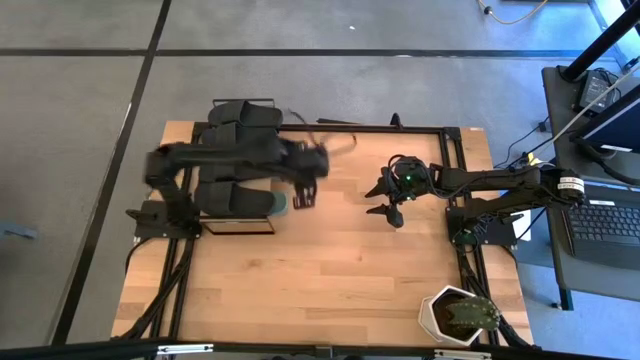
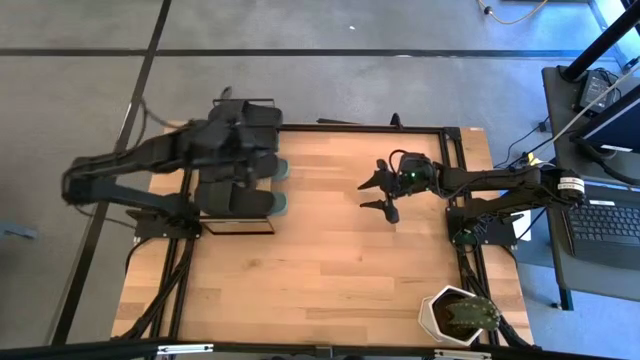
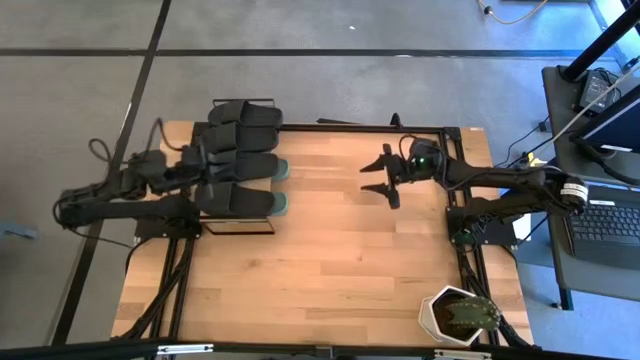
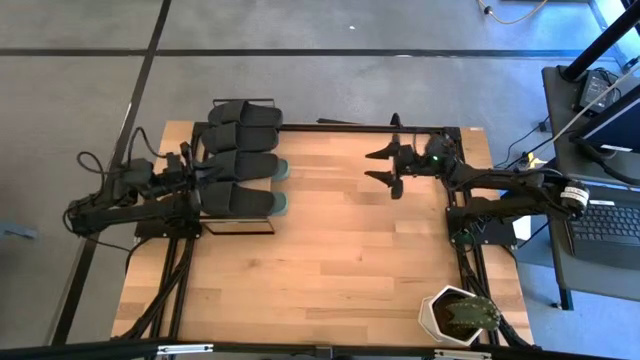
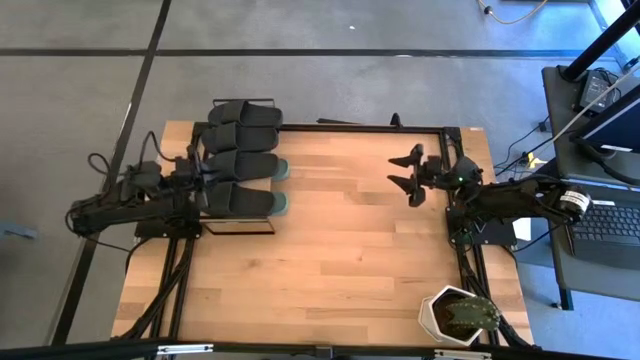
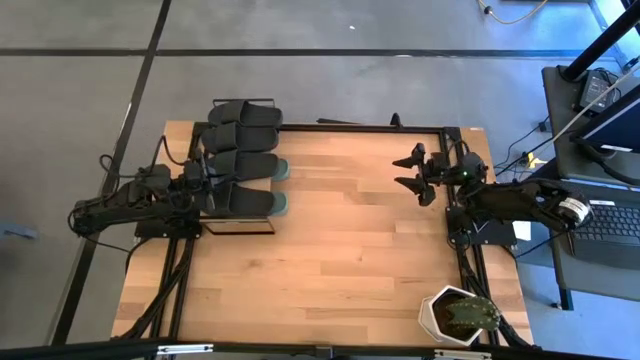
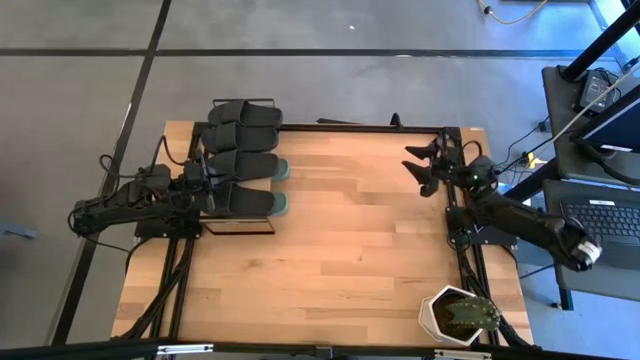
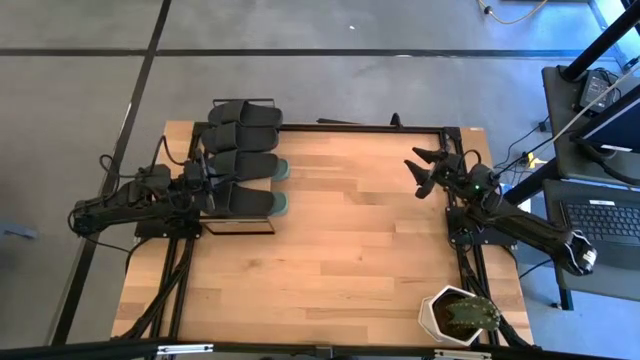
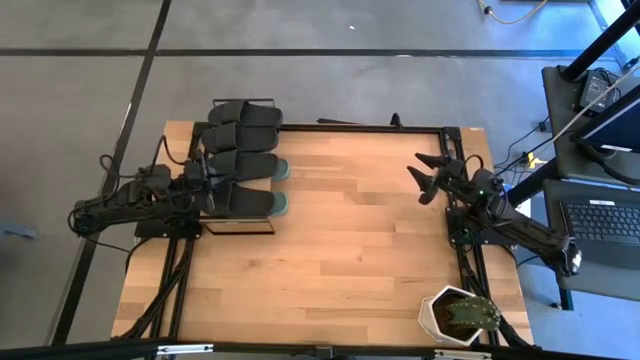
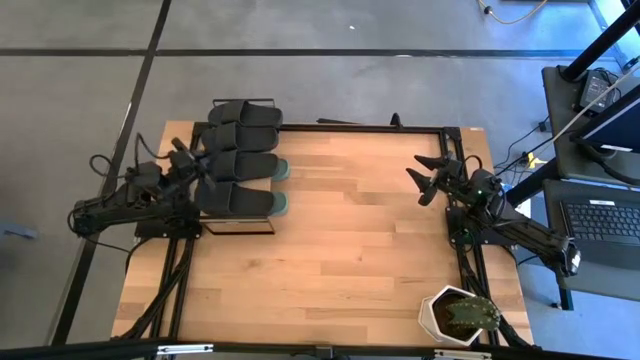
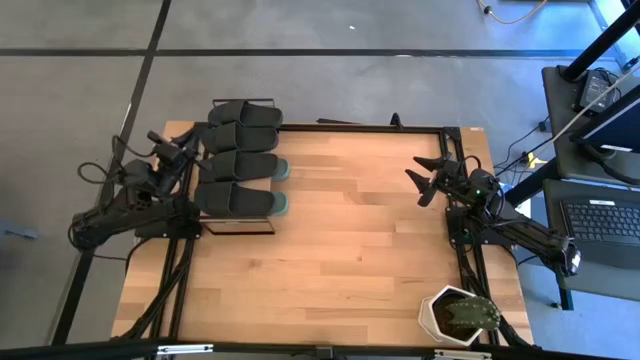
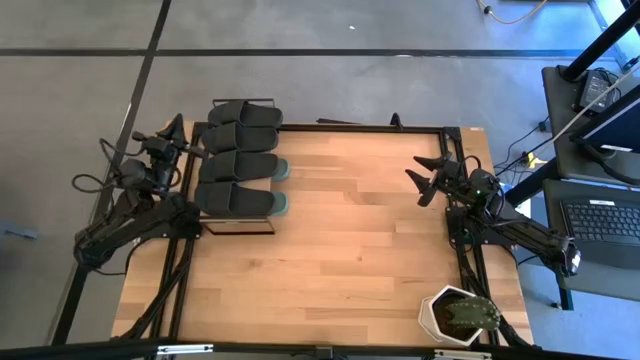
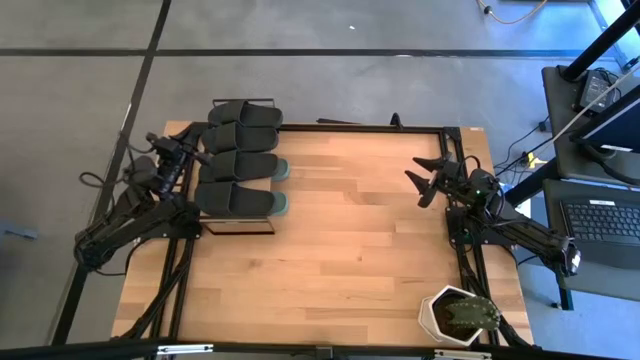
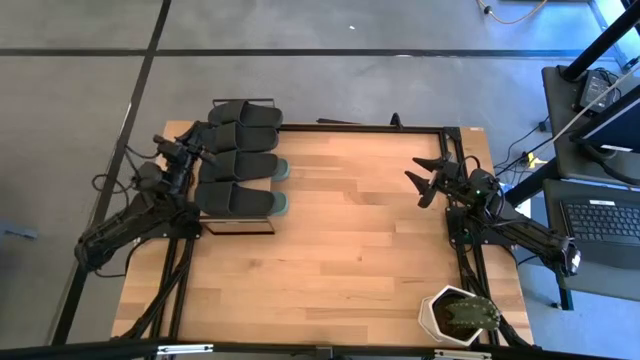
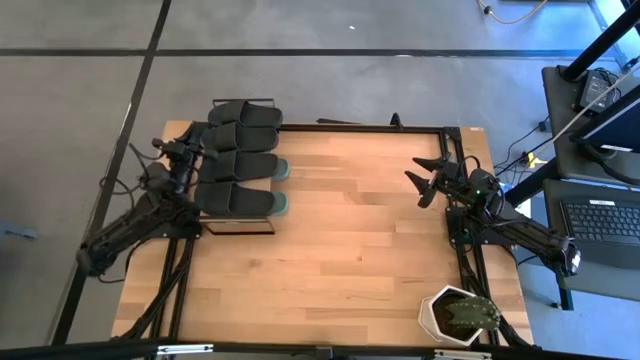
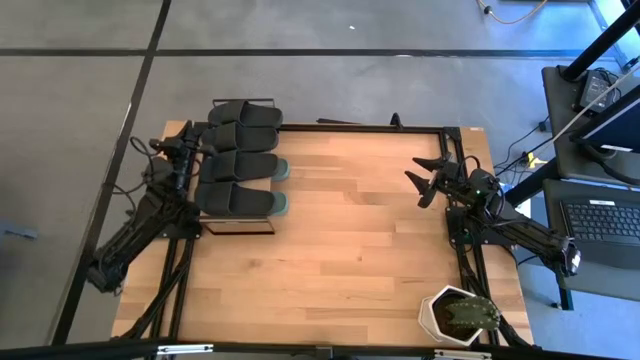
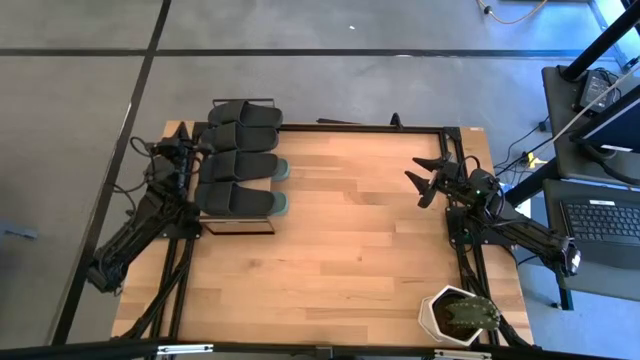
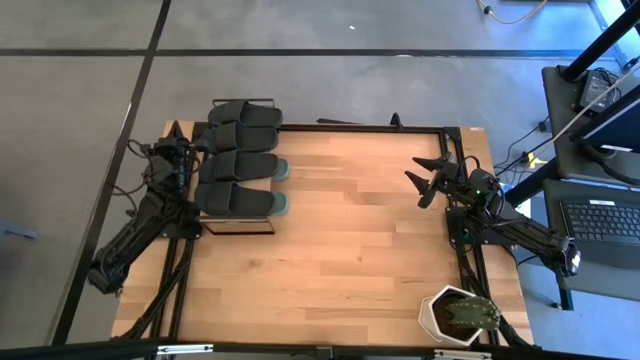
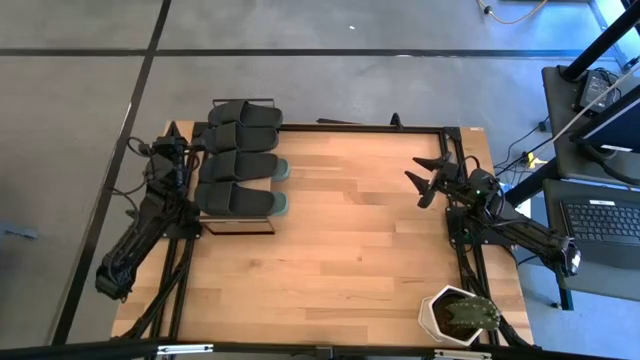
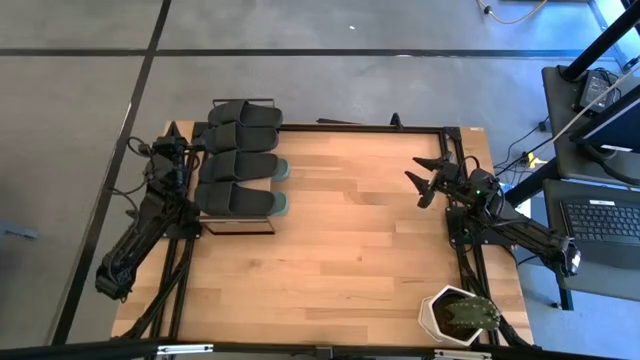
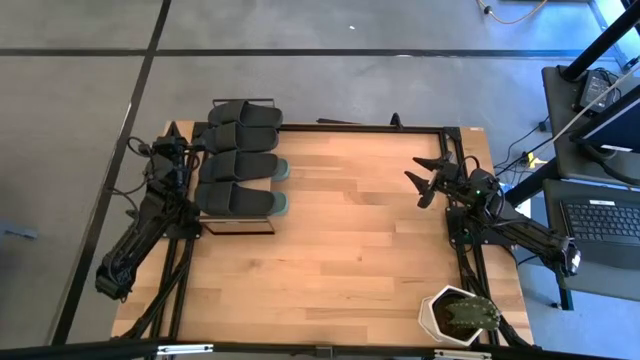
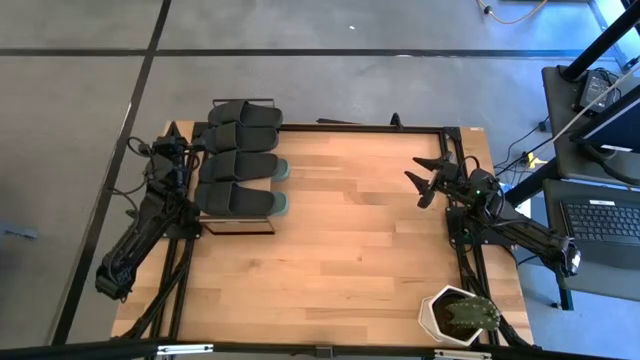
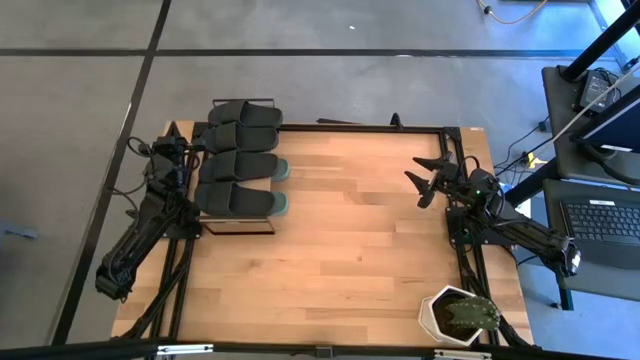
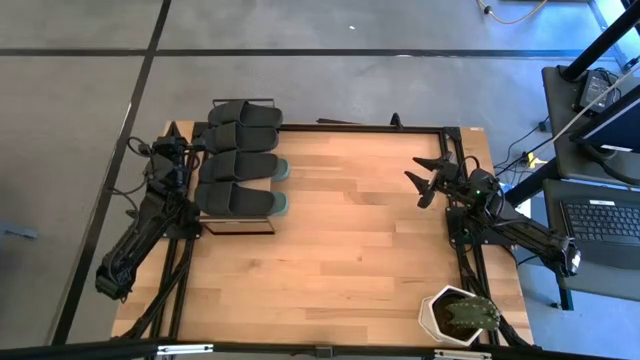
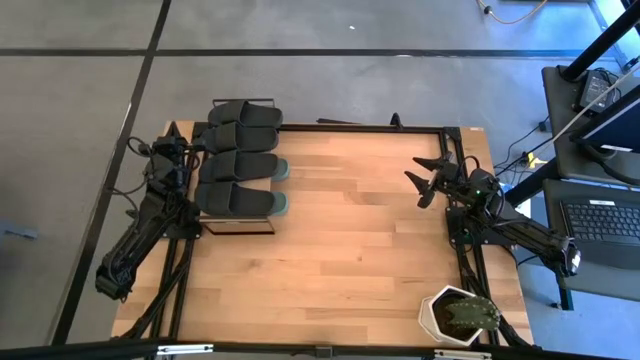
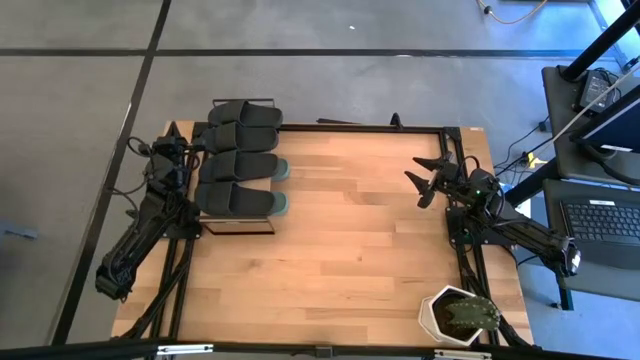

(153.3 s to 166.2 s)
Task: Pick and place slides into the shelf
Return to Home Position
